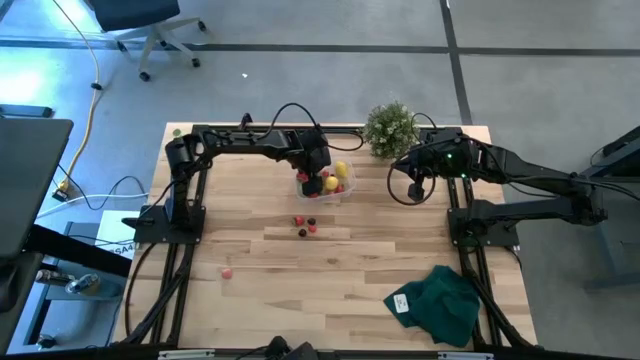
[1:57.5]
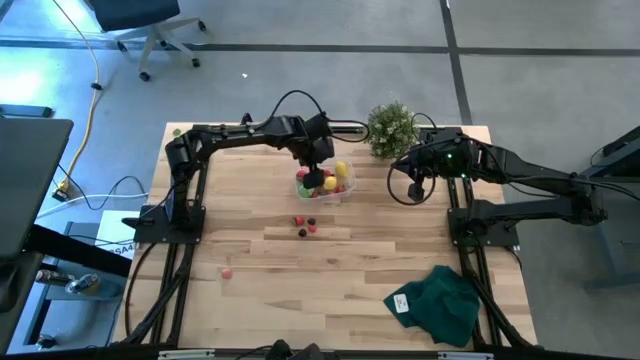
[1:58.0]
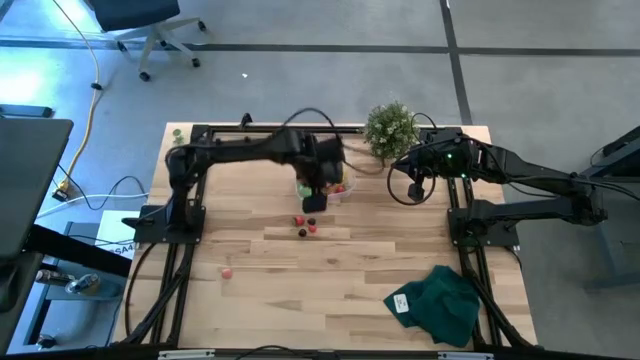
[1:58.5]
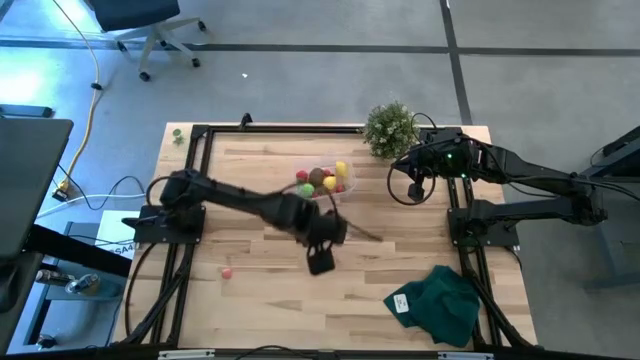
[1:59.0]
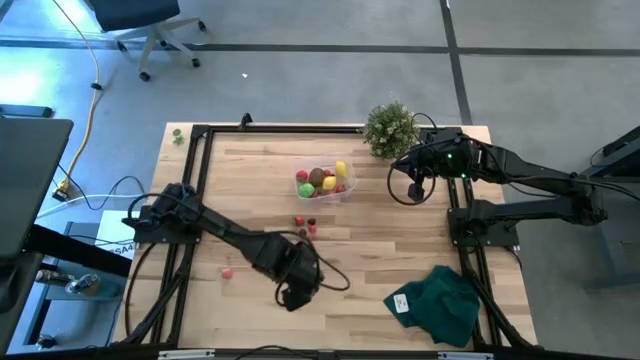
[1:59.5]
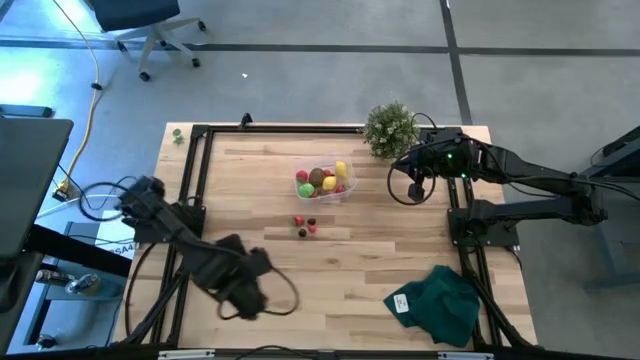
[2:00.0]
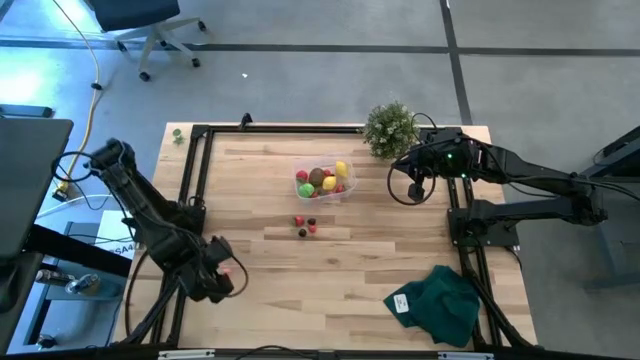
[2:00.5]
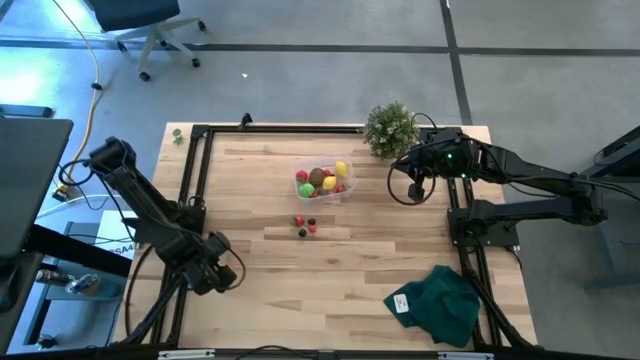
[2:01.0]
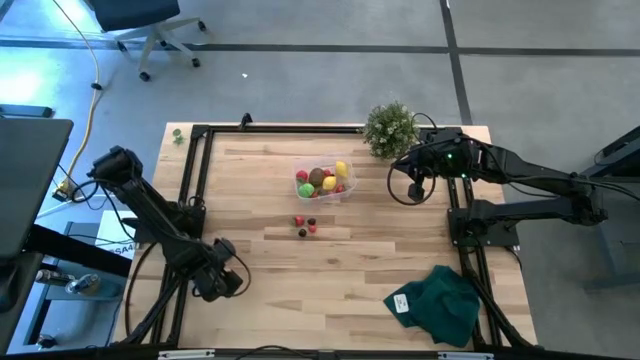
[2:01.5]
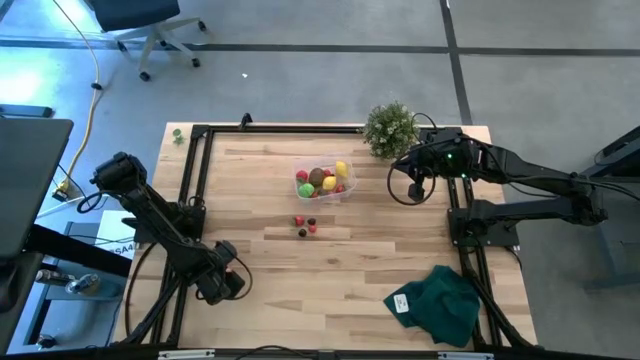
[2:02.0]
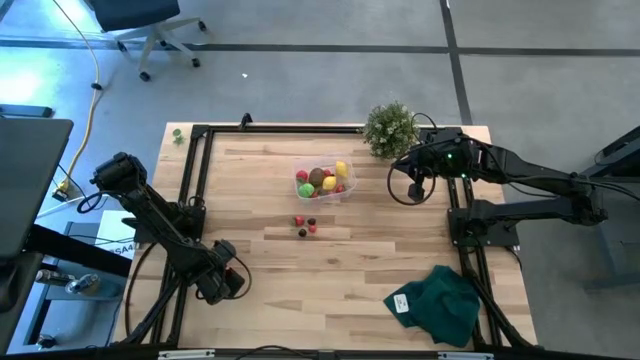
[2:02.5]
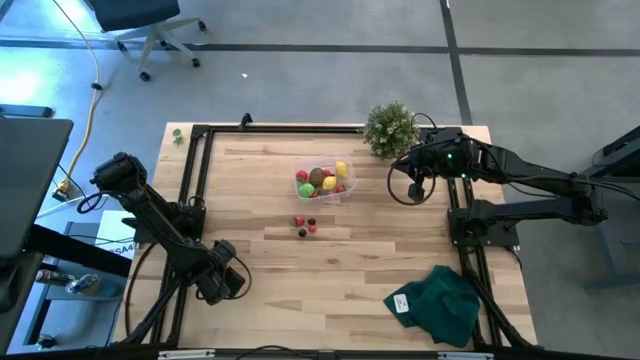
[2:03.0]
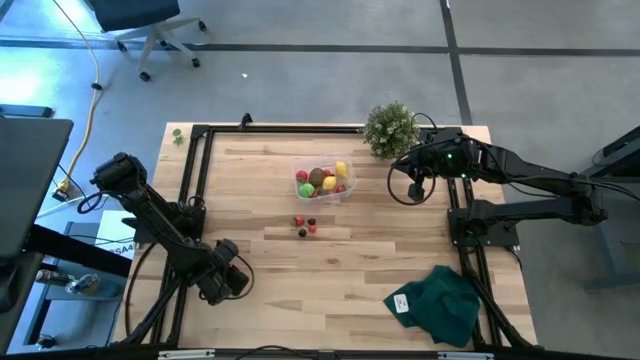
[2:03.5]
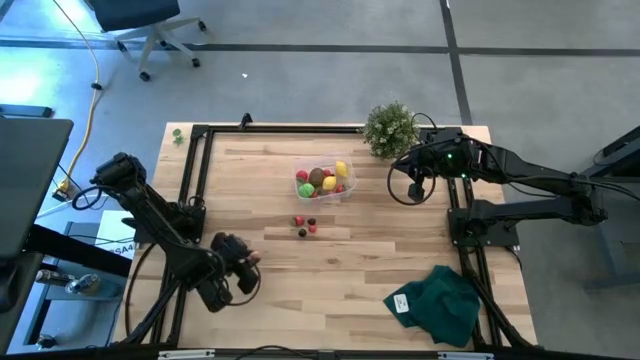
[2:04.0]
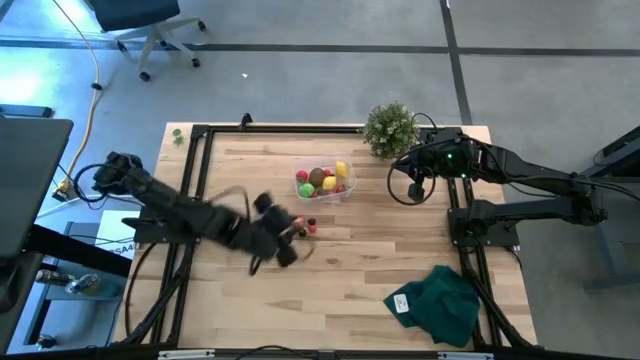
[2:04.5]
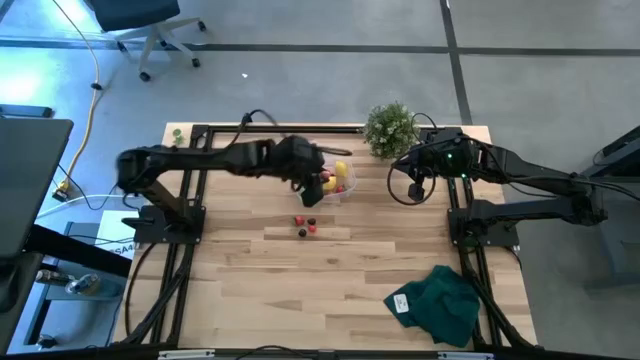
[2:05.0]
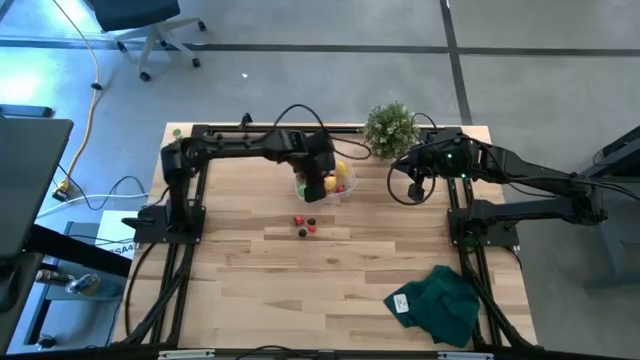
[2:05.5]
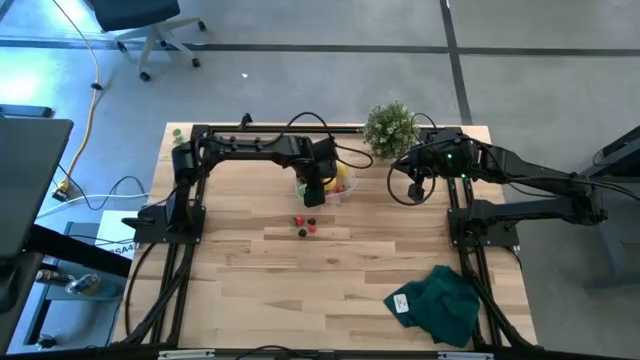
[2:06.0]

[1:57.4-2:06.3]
Task: Pick and placing Produce into tupperware
Put the pink peach into the transparent bin

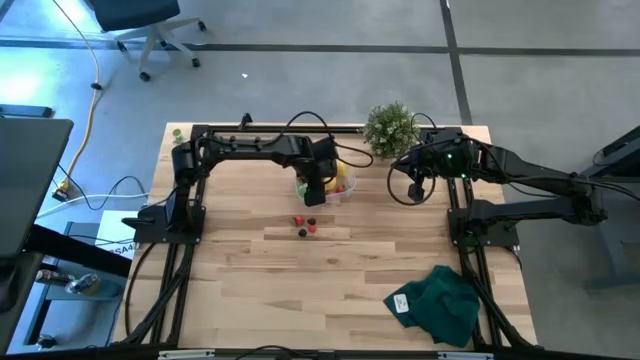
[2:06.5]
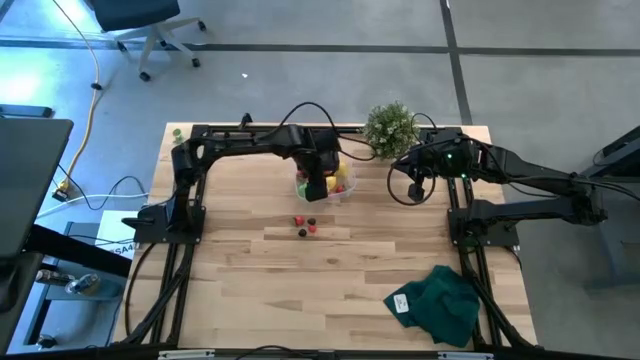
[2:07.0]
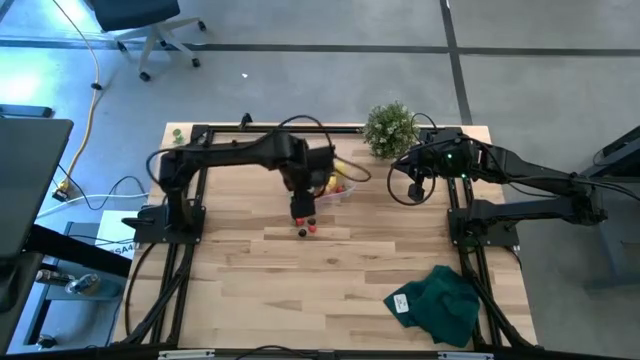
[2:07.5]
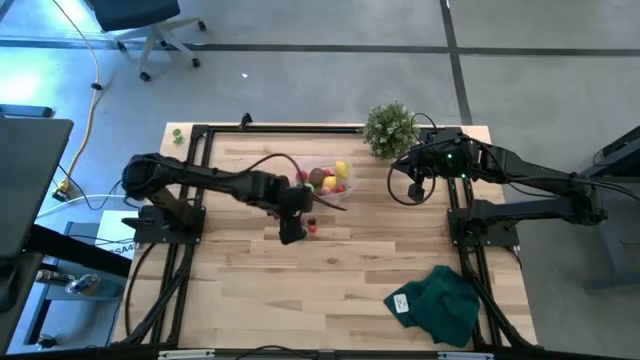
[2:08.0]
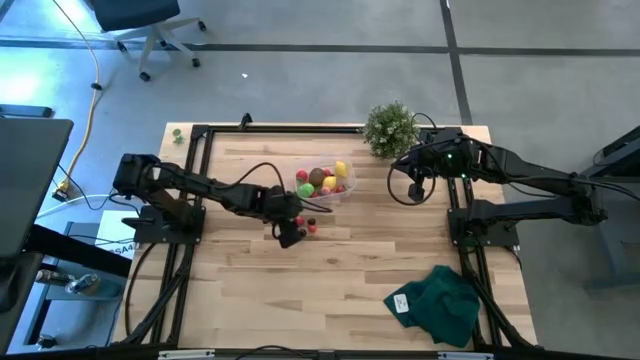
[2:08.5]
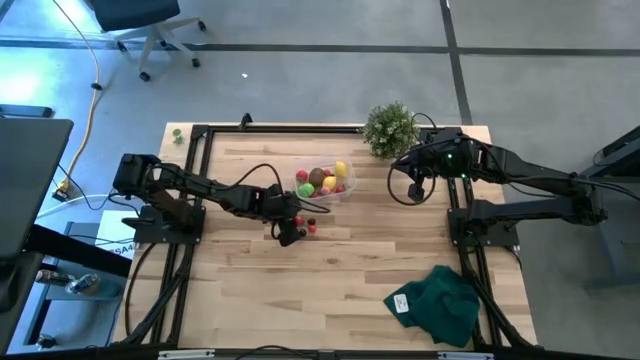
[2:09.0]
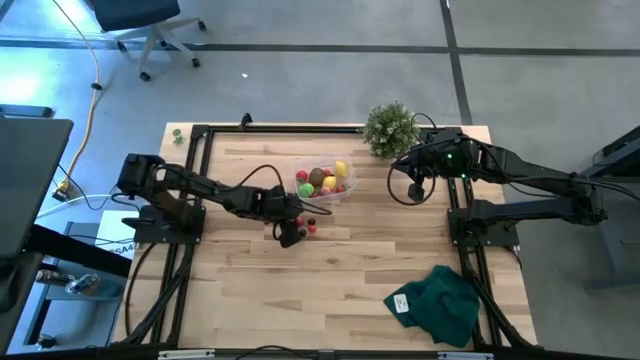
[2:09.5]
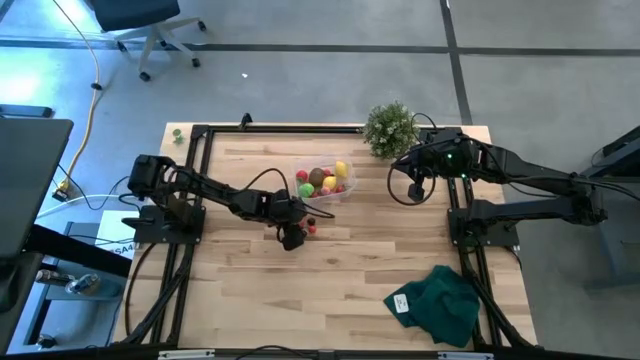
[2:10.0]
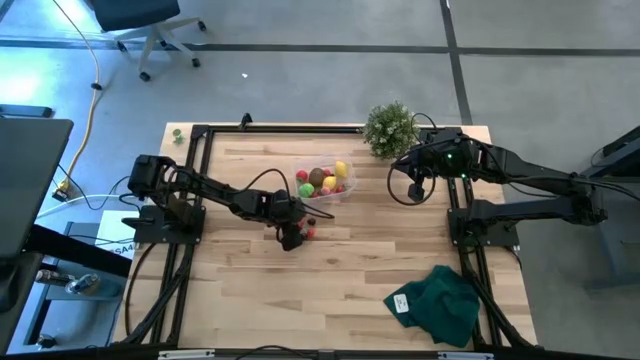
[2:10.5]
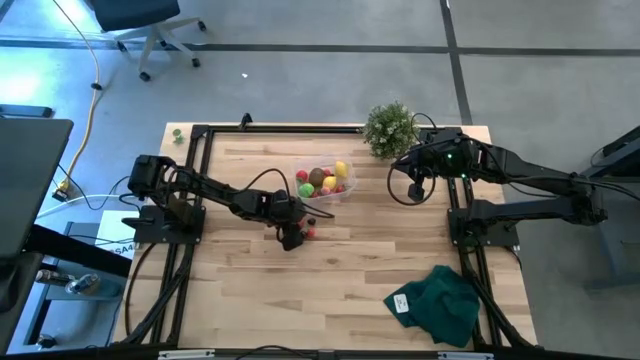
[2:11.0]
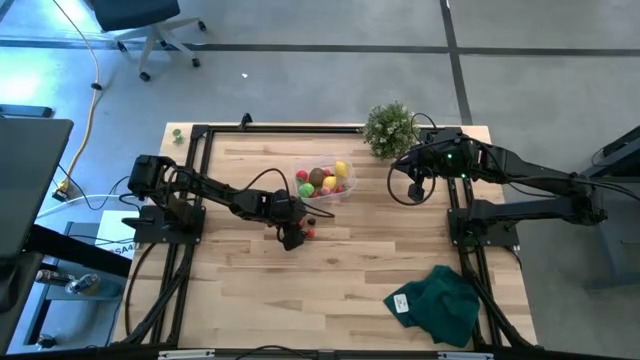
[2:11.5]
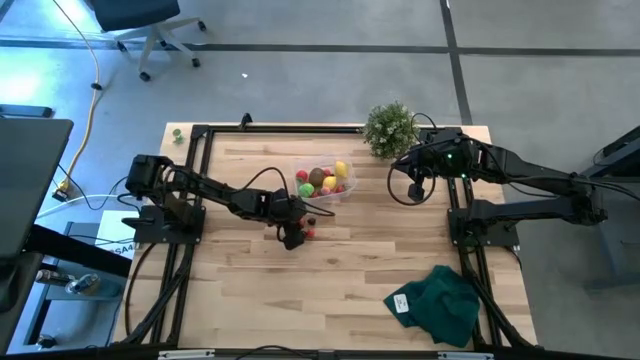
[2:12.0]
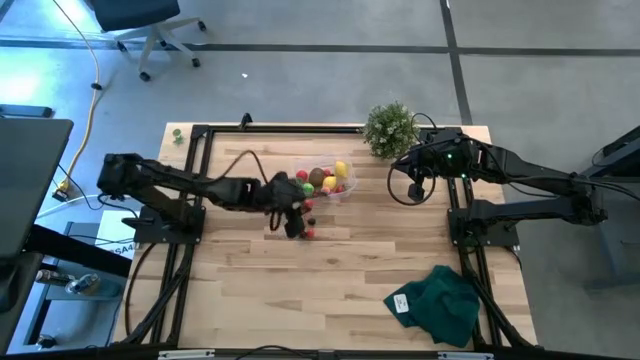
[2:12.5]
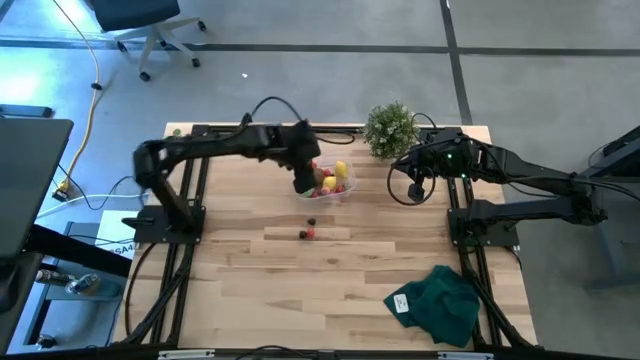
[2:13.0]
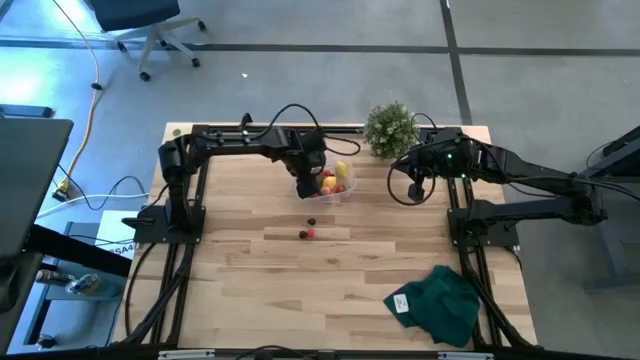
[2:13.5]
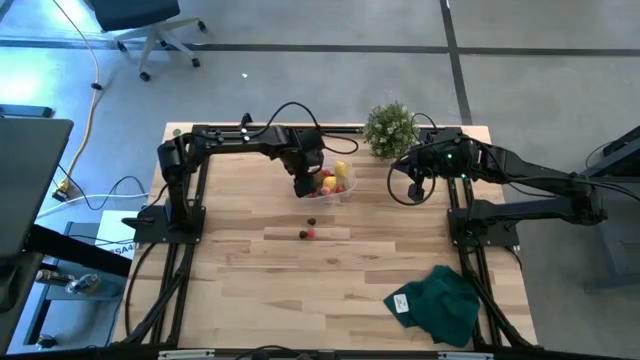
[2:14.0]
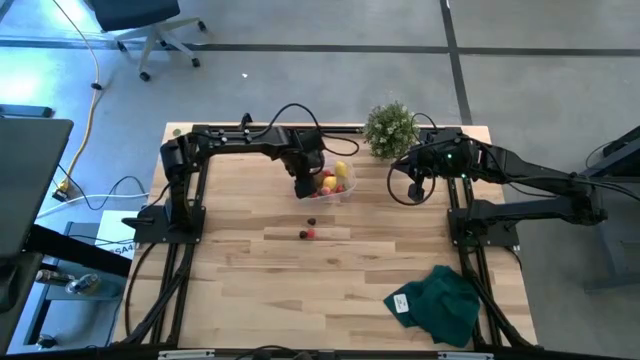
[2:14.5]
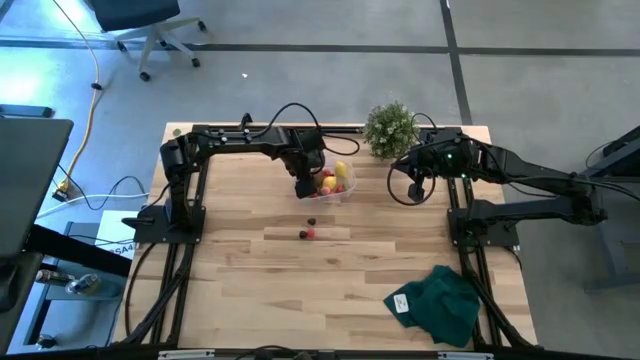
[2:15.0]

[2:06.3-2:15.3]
Put the red strawberry into the transparent bin

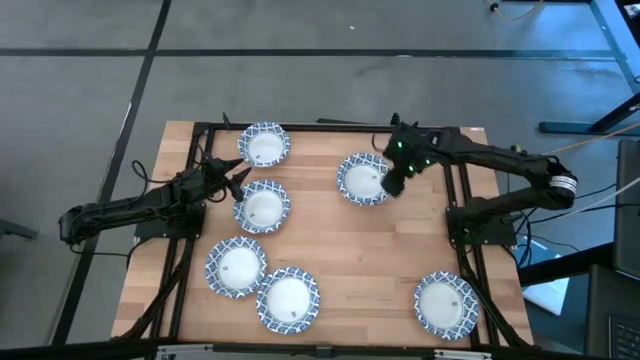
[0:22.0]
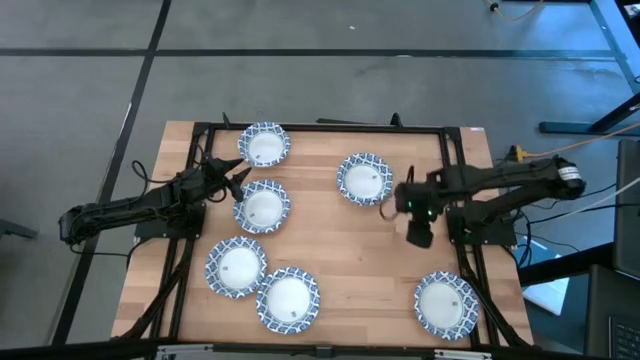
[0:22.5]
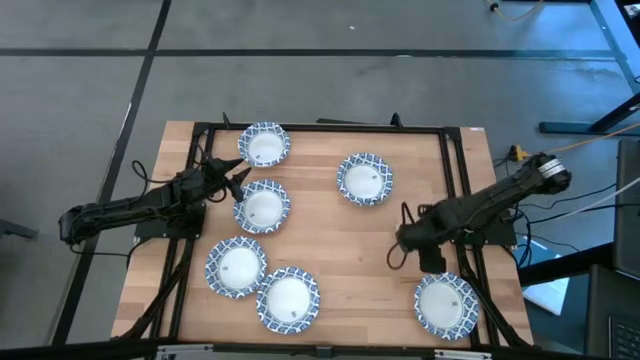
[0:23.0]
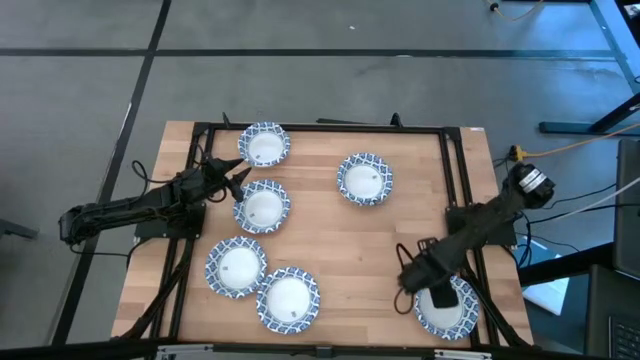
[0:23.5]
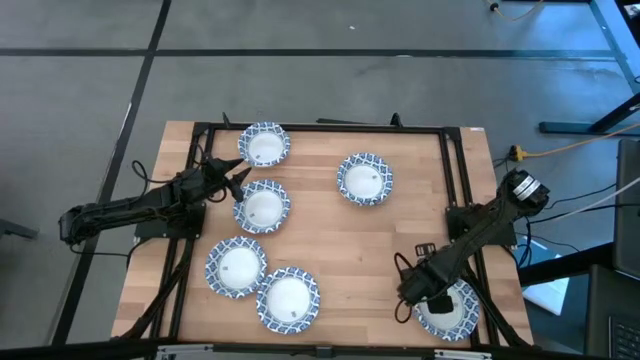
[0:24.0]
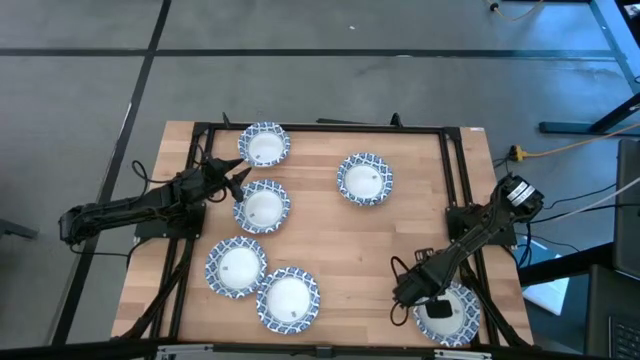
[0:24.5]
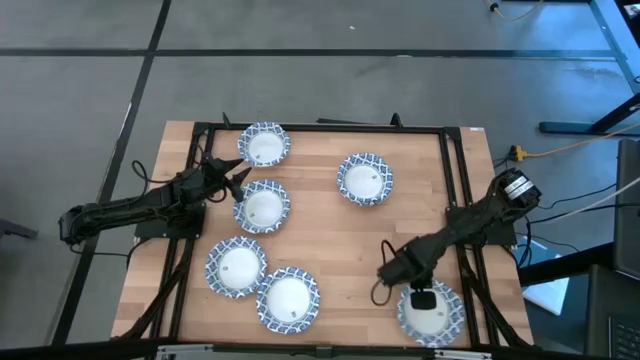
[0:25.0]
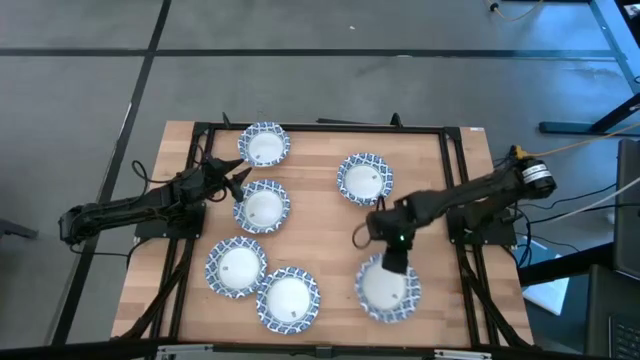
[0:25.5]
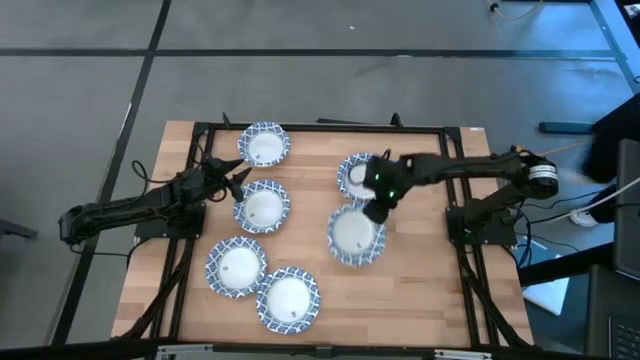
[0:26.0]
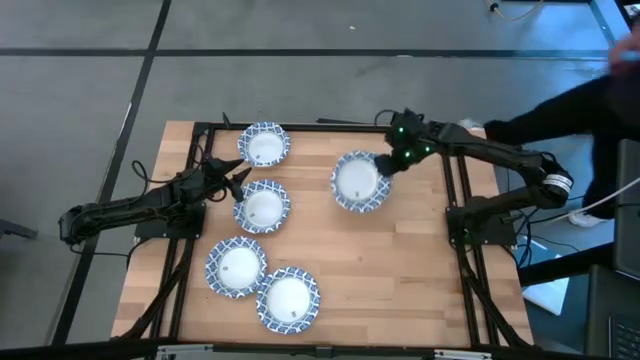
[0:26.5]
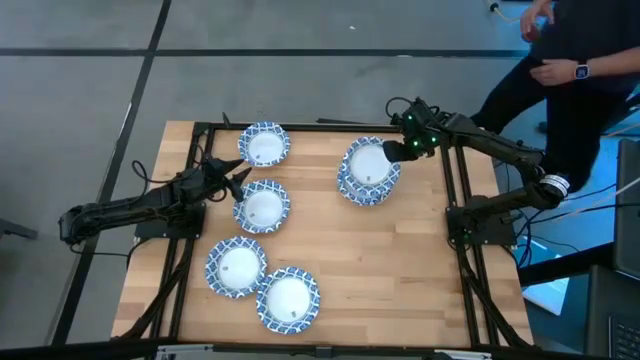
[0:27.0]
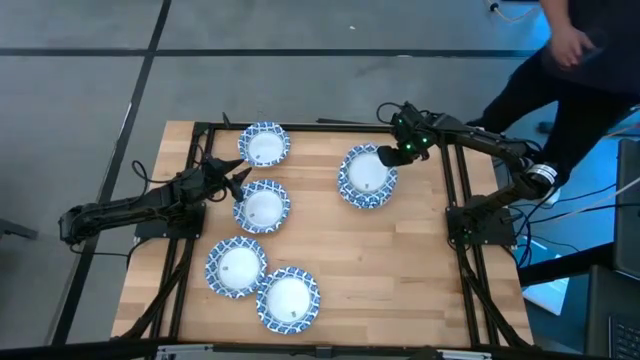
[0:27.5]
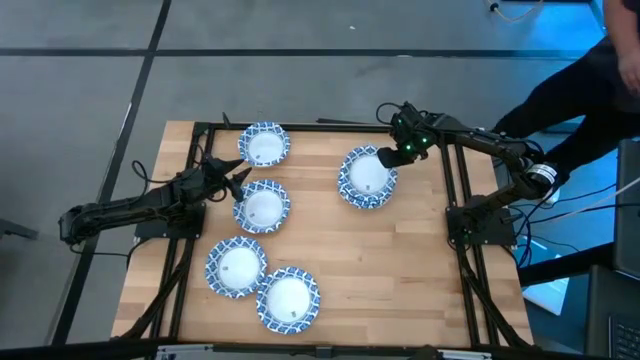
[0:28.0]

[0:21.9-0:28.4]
Task: Nest bowls inside each other
Stack the white bowl on the white bowl
